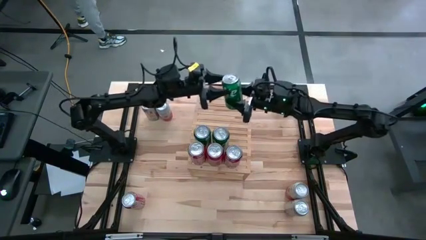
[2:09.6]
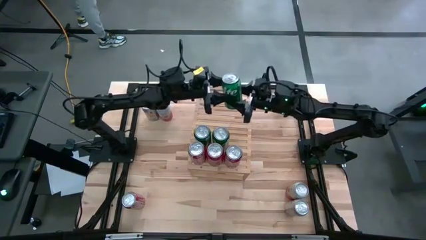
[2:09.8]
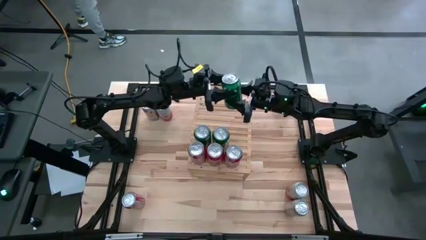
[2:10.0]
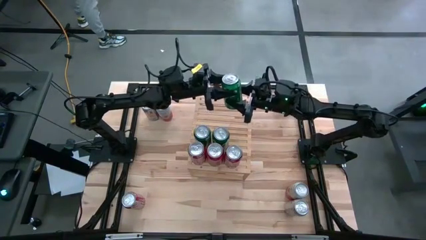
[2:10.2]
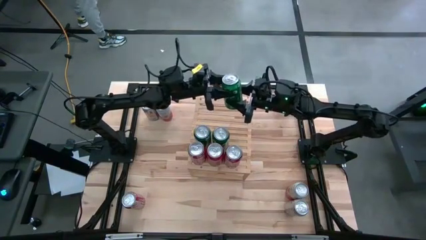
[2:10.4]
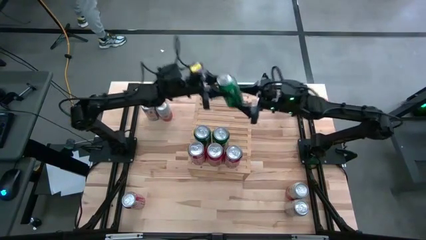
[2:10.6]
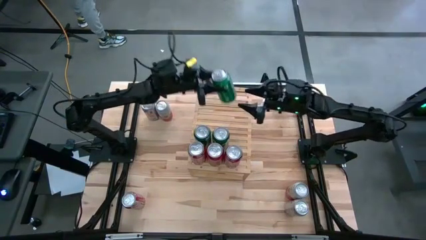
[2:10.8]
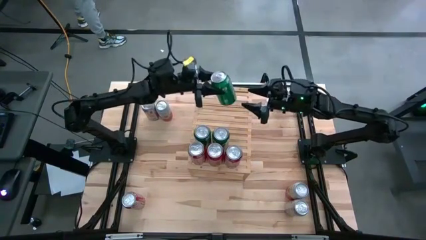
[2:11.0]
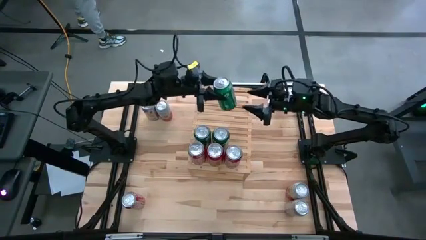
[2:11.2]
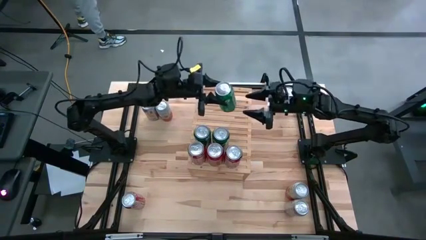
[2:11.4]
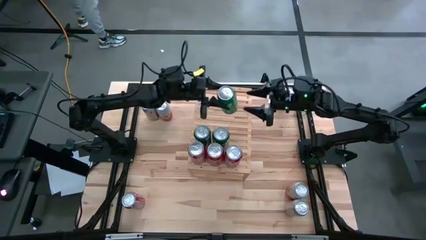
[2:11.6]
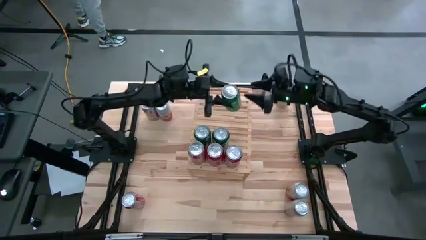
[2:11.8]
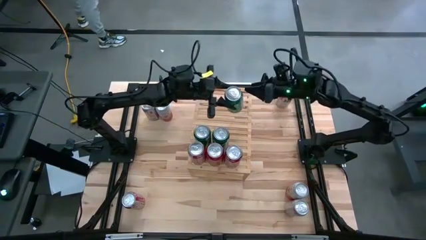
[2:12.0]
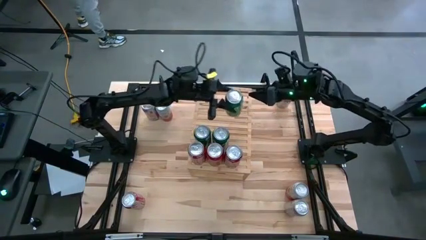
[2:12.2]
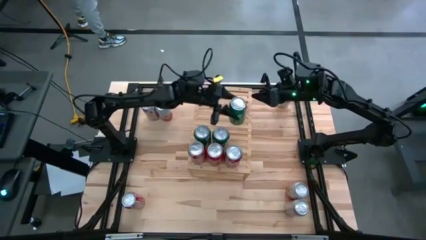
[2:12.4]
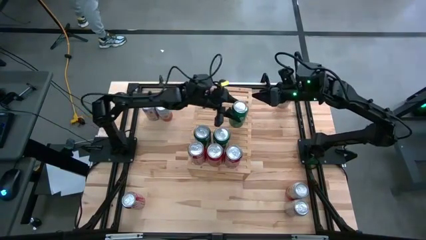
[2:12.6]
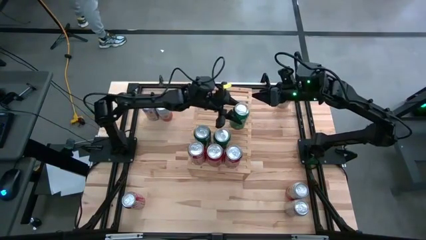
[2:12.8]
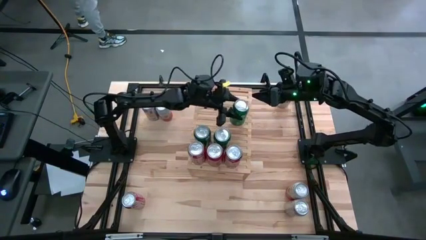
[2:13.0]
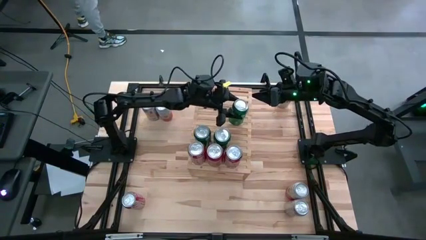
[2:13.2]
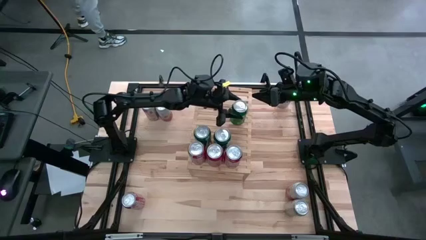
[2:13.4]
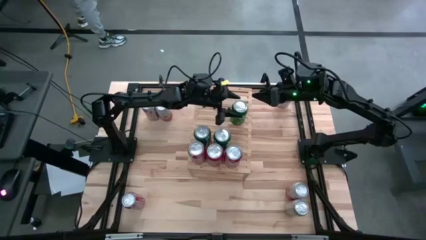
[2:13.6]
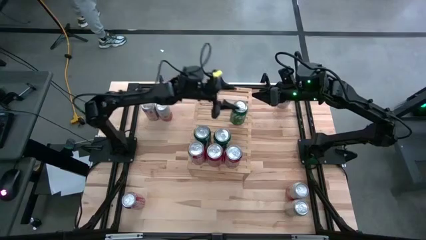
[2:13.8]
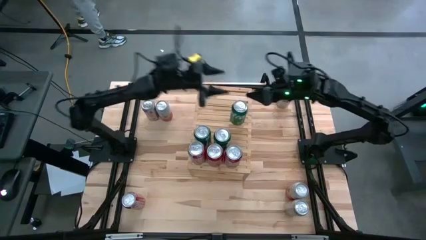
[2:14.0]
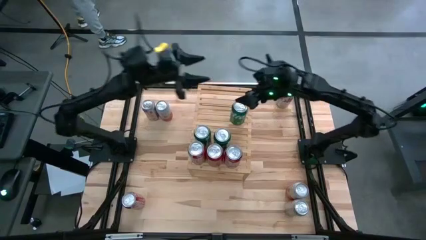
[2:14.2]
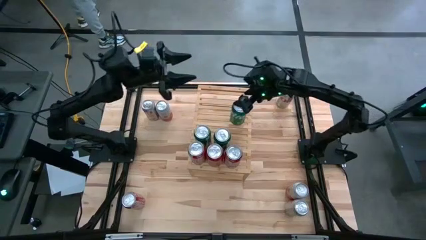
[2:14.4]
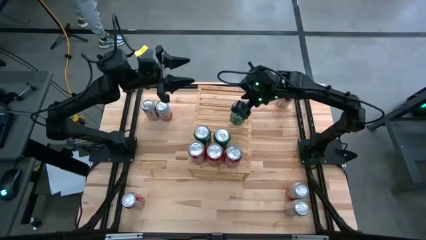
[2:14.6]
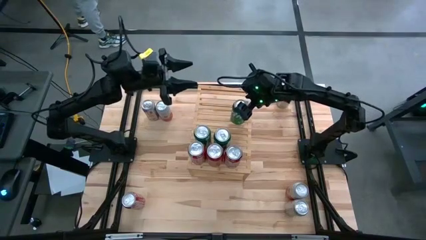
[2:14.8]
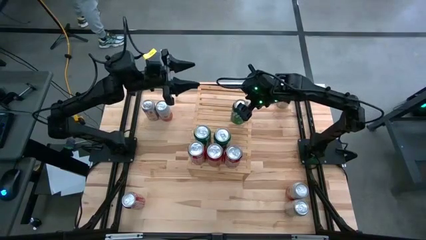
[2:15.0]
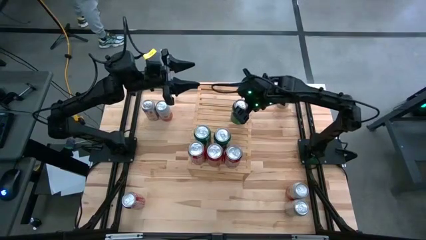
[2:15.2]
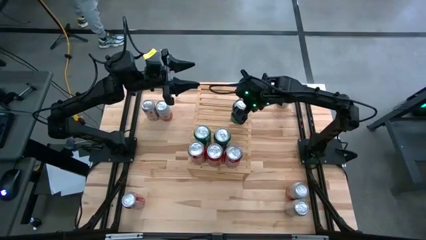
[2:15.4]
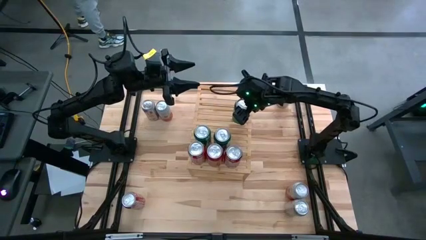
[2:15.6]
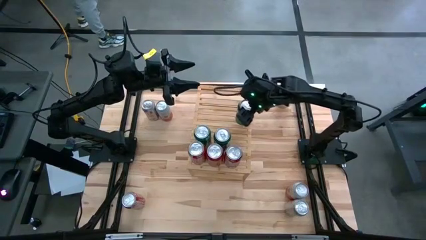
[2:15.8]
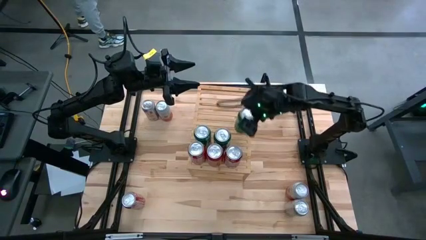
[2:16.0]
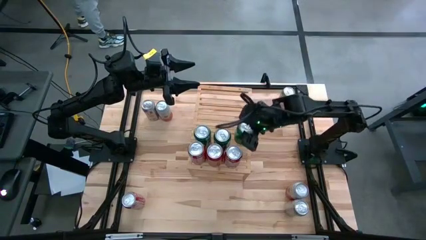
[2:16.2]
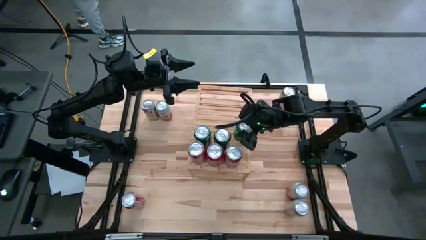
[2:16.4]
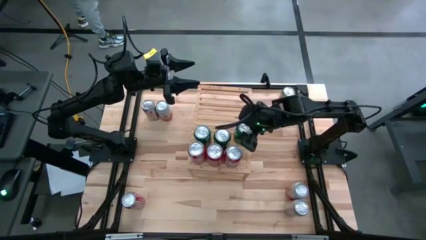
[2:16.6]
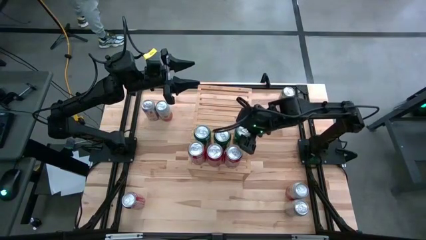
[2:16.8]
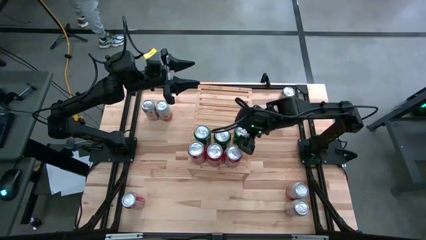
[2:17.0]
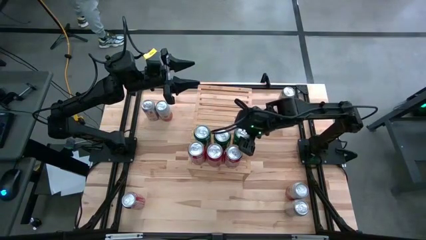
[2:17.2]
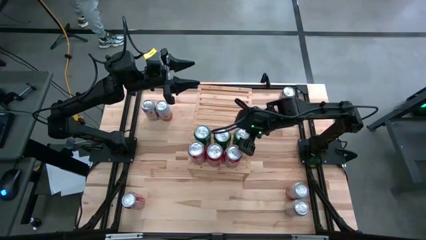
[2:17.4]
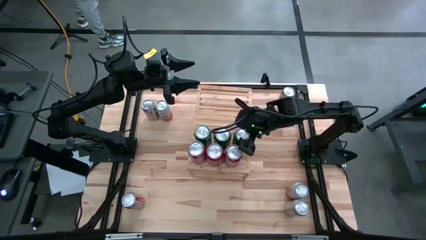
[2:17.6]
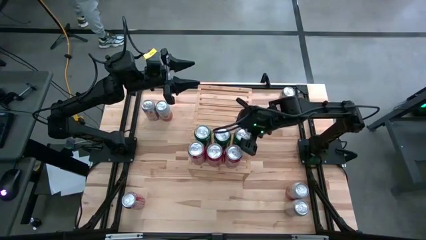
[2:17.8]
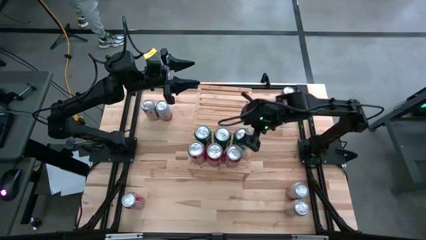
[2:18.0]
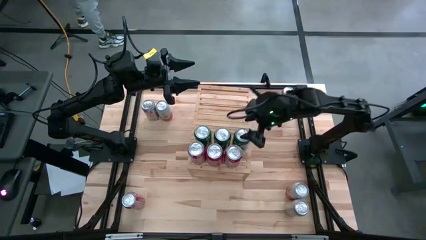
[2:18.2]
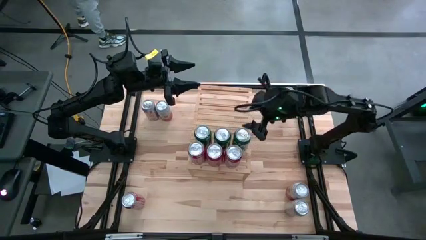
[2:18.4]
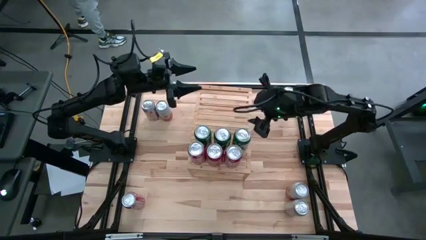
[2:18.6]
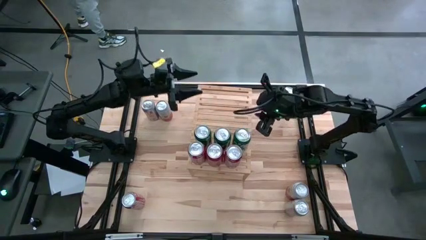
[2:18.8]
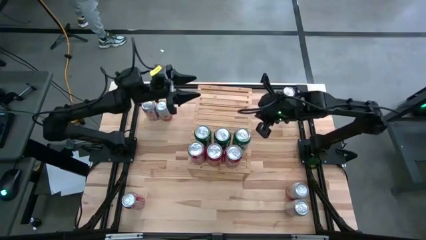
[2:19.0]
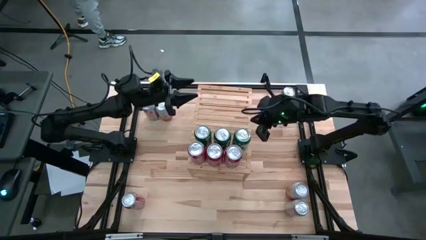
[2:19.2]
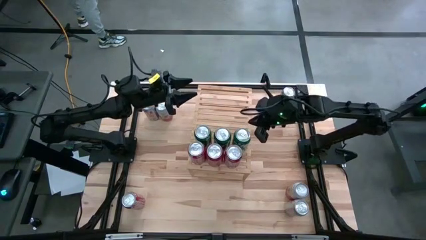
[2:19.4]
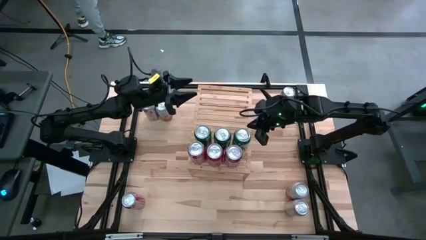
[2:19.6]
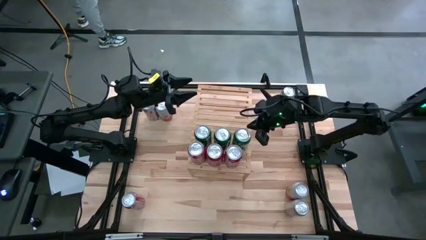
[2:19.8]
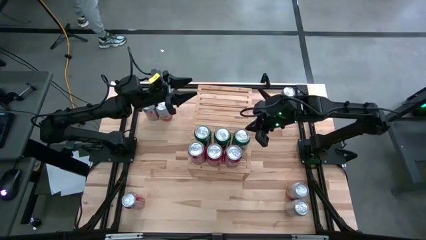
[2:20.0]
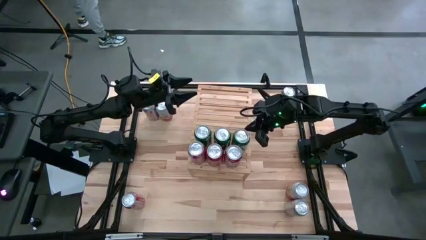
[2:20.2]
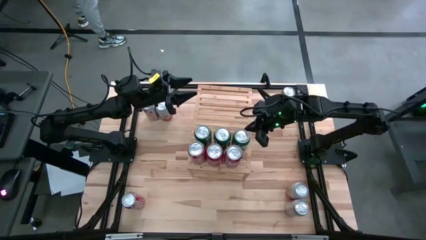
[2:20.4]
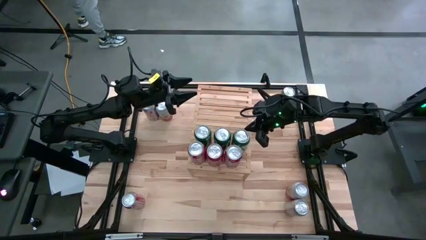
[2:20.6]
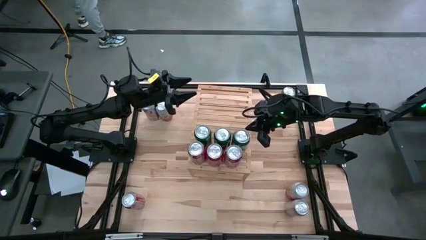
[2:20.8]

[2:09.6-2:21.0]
Task: Place canned beverage on shelf
Put the green soda can on the shelf aligned with the other green soda cans

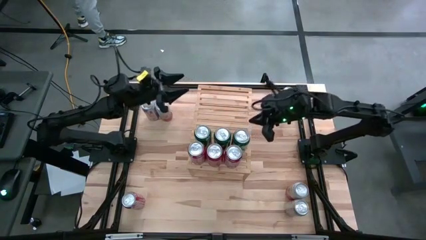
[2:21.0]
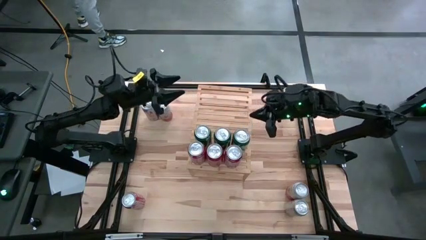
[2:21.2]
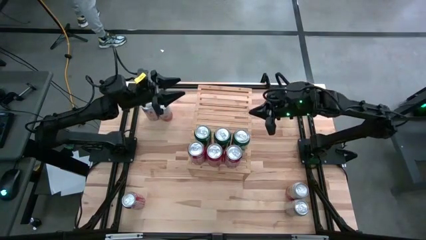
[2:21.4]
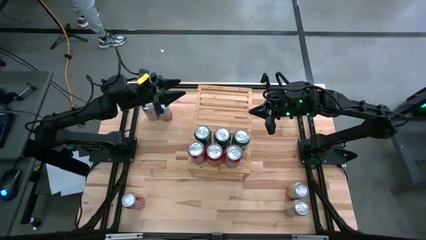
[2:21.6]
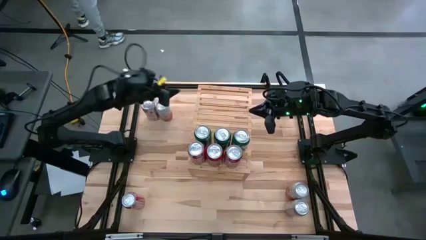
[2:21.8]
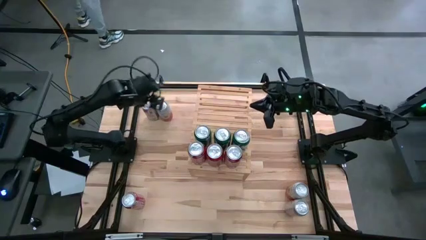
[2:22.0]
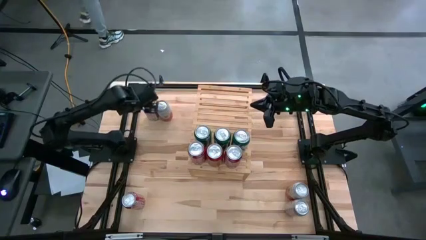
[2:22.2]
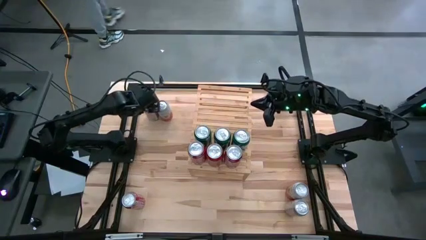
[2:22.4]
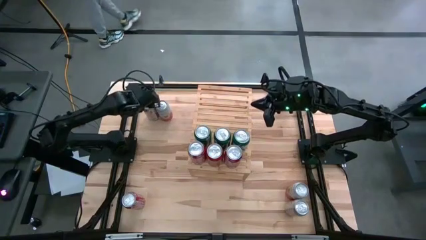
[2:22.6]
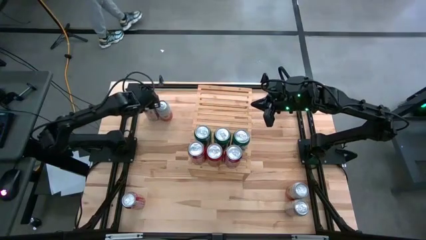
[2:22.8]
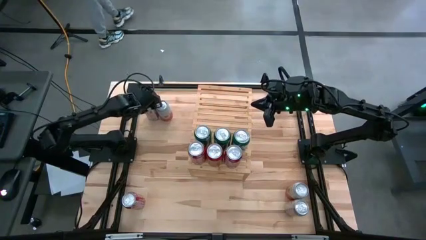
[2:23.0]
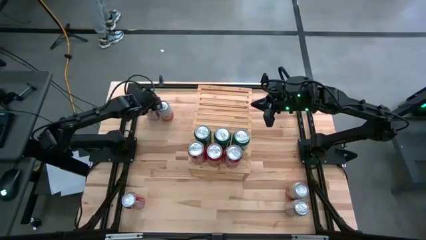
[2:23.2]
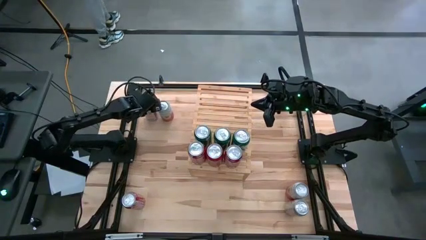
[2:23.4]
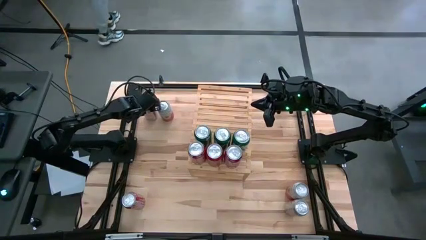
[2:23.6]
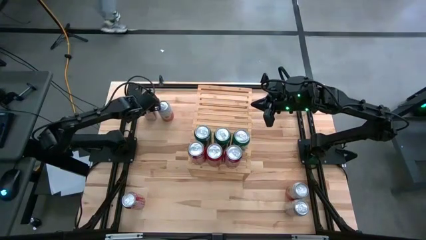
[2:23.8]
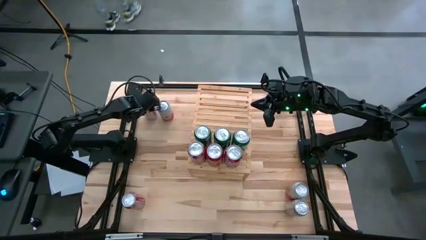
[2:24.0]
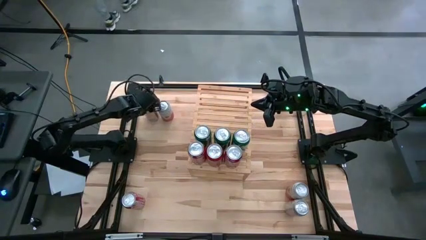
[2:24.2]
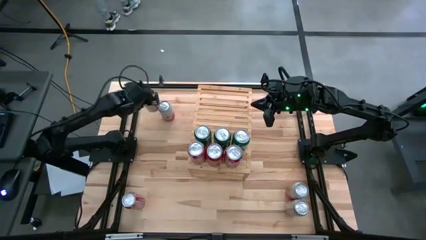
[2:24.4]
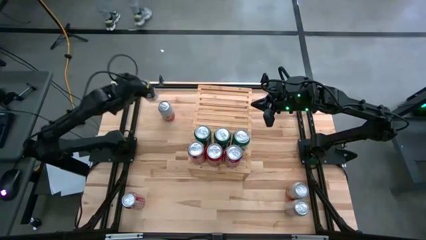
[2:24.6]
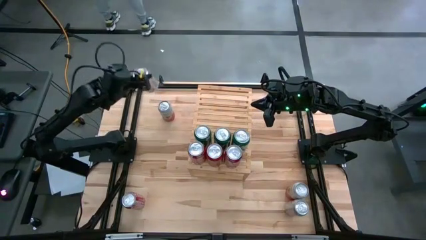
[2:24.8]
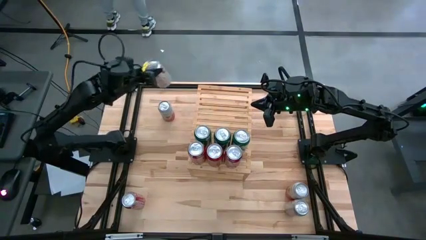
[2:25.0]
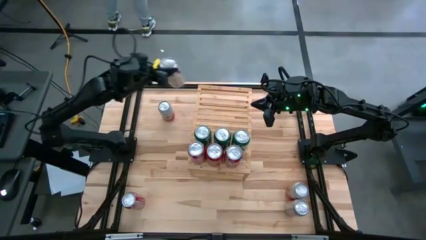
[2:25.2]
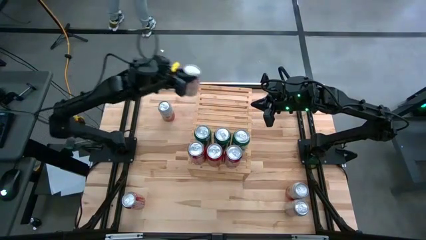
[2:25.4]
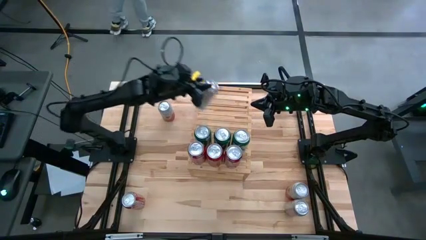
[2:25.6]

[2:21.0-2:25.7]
Put the top left red-silver soda can on the shelf
